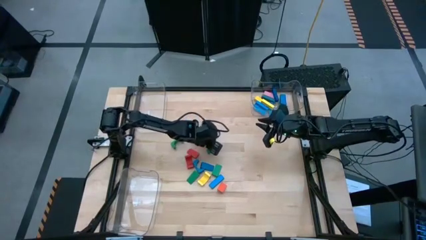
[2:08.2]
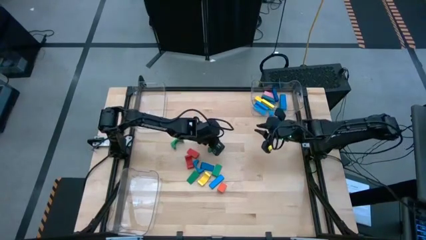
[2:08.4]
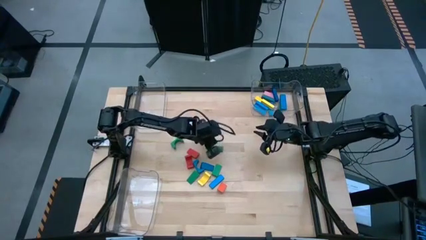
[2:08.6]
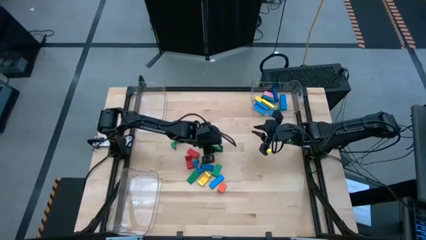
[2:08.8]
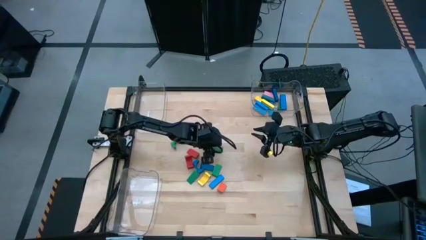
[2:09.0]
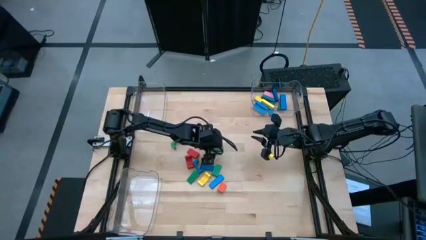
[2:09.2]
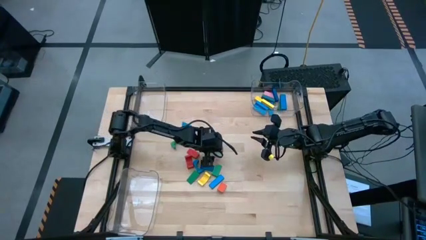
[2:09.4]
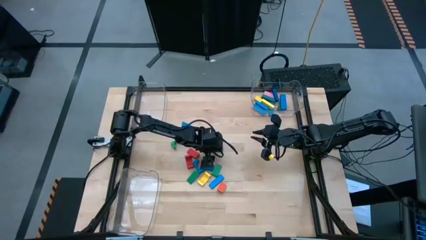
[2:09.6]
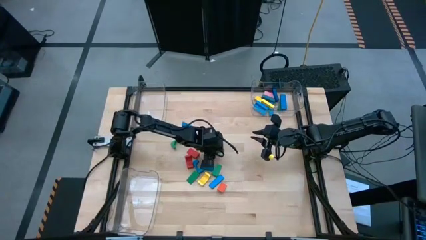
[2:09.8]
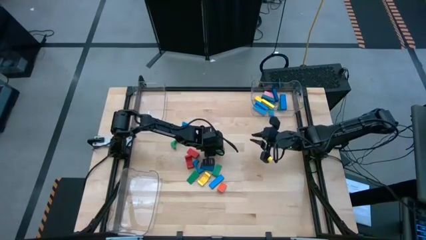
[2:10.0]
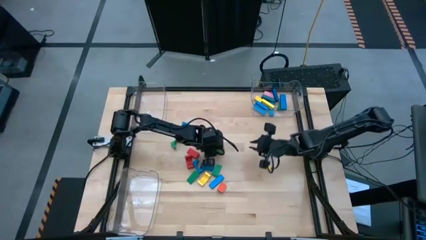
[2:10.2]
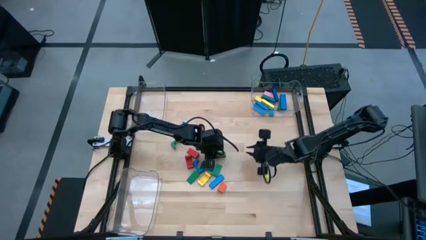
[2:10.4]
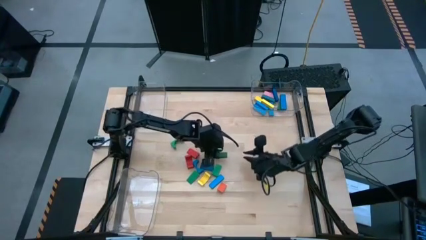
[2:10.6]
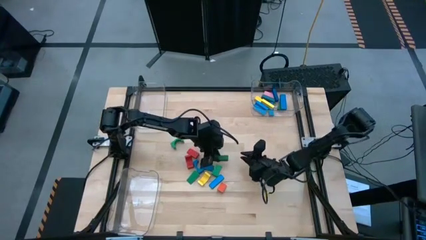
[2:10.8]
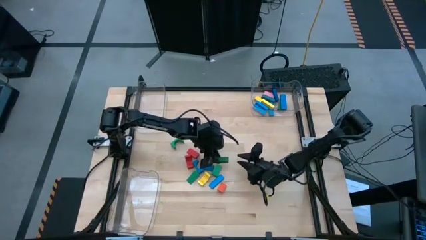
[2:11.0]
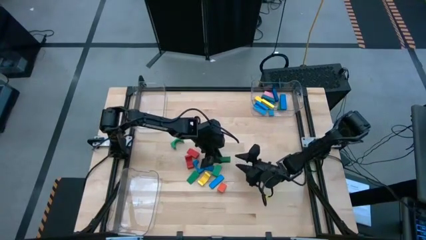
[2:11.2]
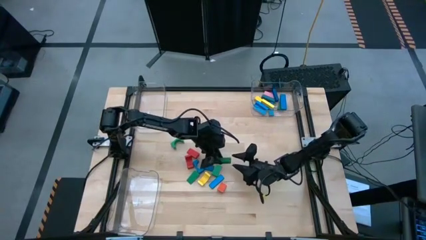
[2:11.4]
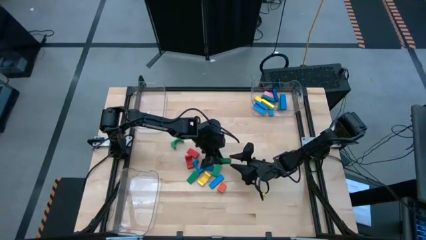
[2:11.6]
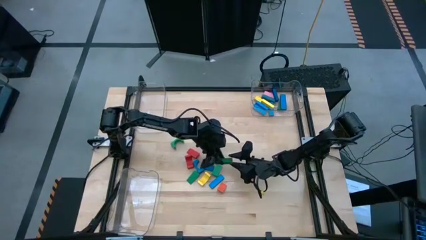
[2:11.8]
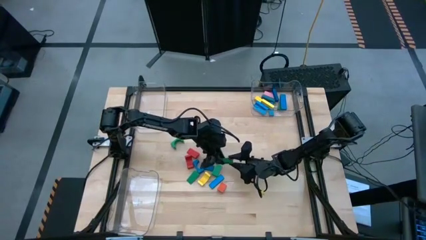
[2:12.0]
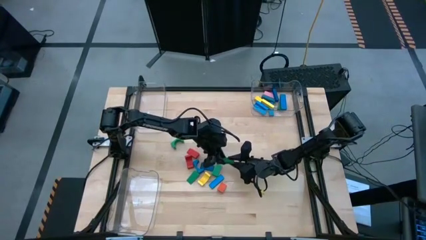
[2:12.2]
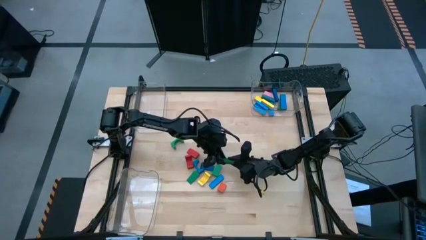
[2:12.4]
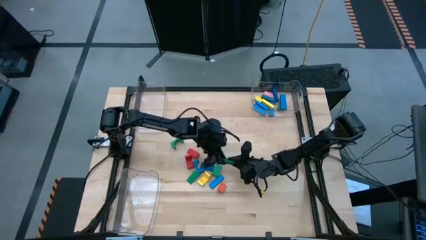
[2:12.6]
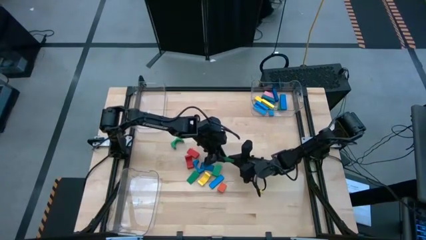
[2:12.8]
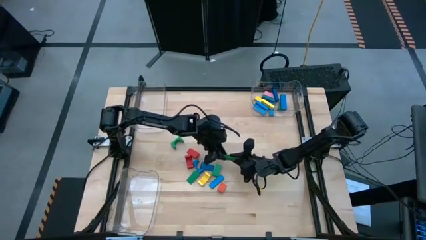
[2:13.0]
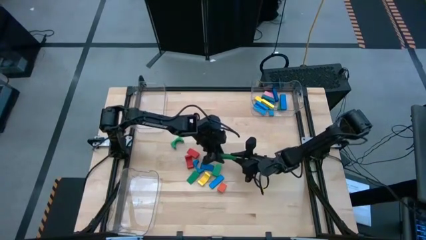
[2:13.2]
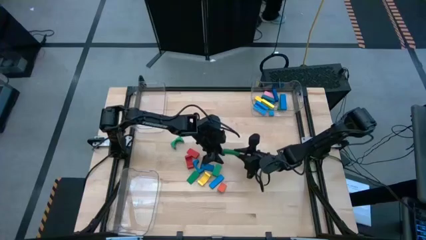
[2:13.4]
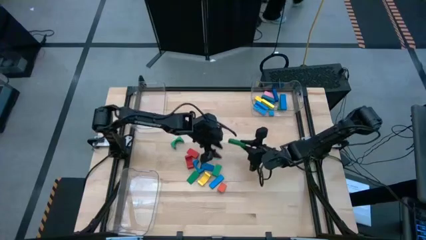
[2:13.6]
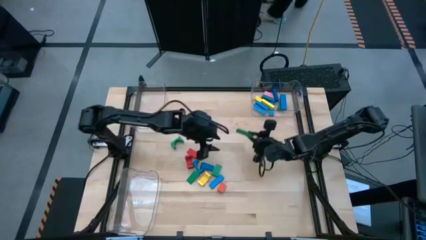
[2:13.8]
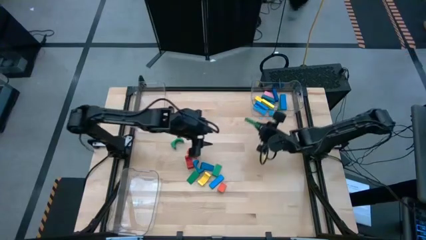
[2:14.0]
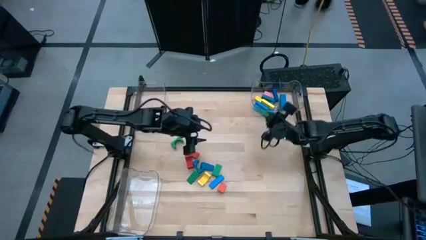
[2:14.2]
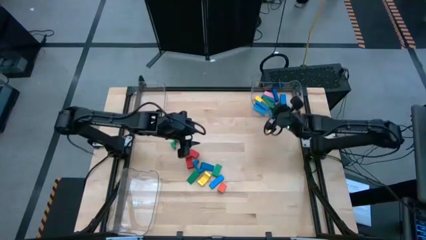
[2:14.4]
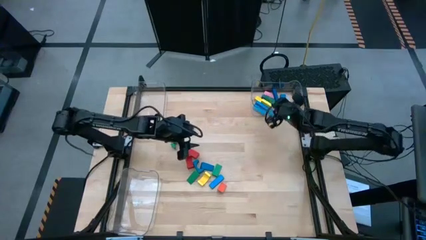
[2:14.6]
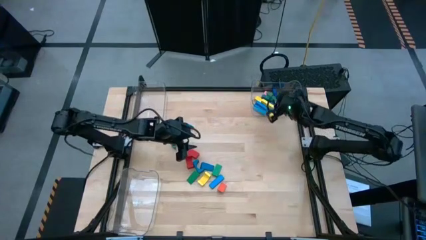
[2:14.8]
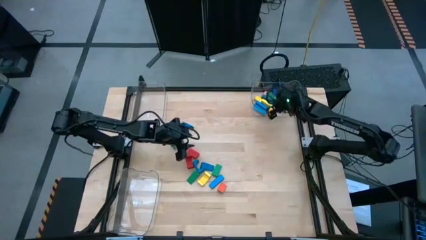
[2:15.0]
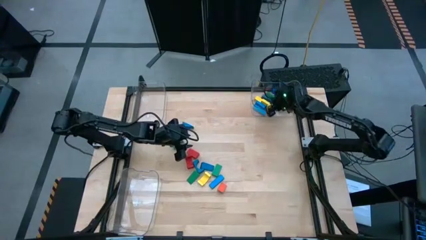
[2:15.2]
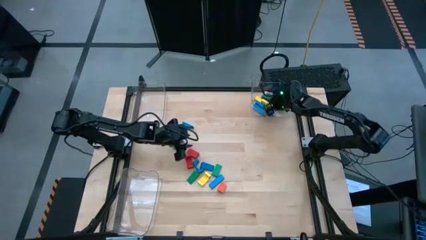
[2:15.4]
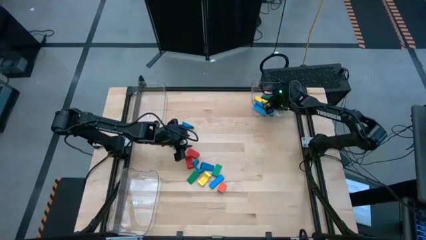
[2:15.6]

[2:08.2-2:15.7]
Task: Sort blocks by size
Put the green rectangular block into the top right transparent bin

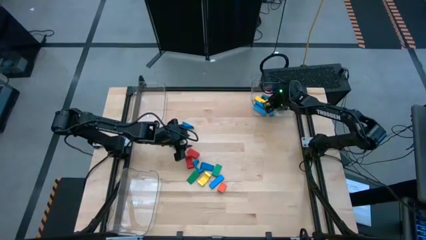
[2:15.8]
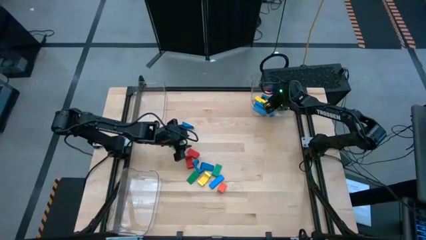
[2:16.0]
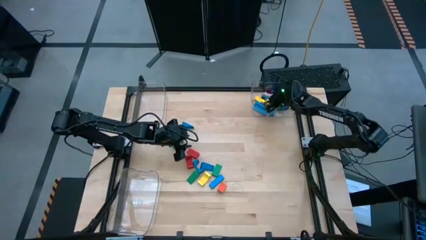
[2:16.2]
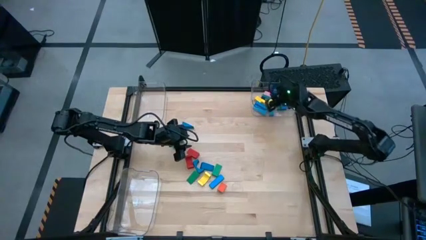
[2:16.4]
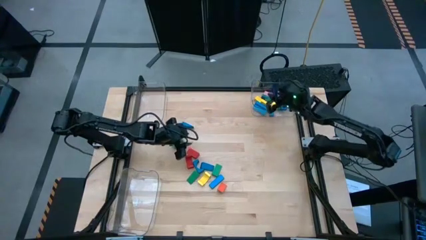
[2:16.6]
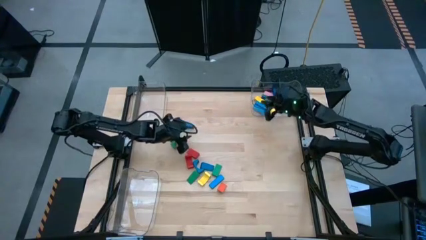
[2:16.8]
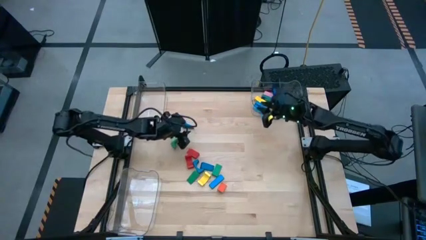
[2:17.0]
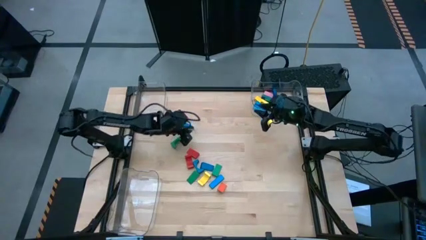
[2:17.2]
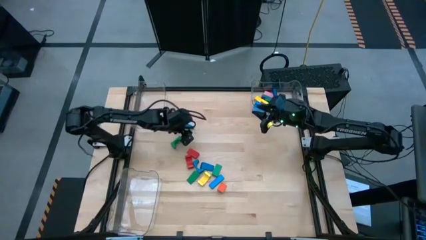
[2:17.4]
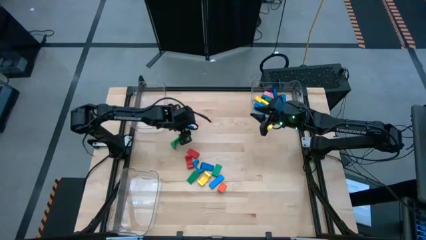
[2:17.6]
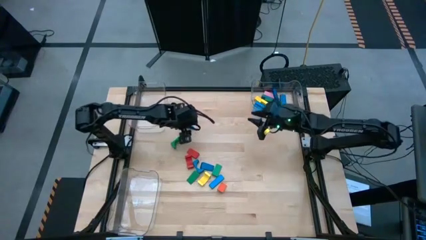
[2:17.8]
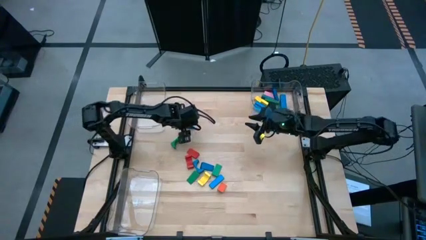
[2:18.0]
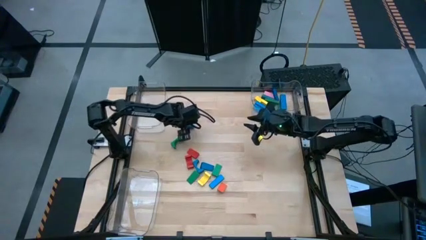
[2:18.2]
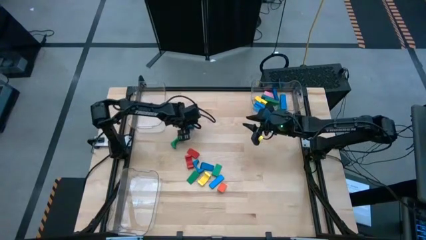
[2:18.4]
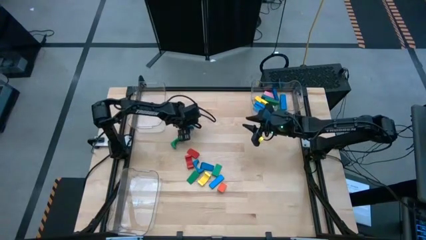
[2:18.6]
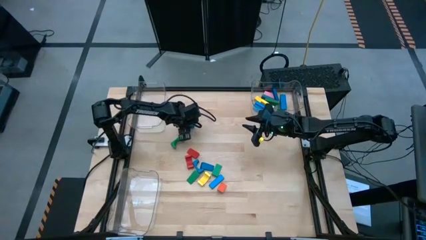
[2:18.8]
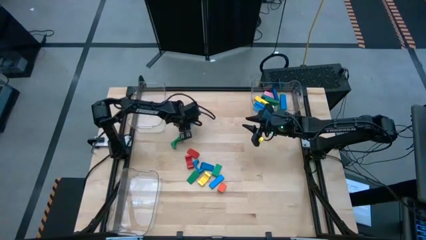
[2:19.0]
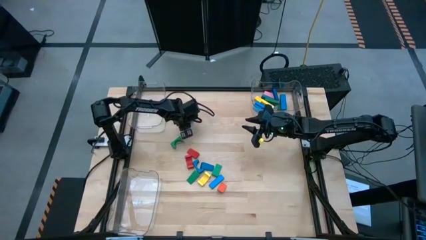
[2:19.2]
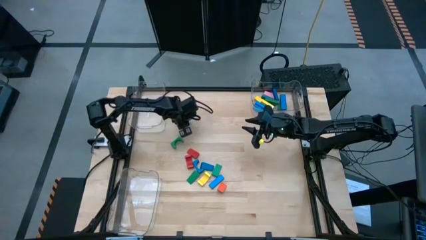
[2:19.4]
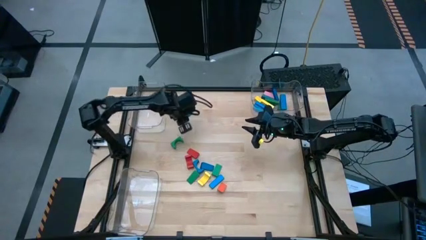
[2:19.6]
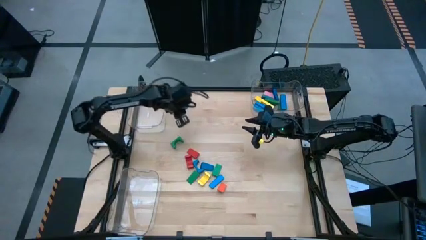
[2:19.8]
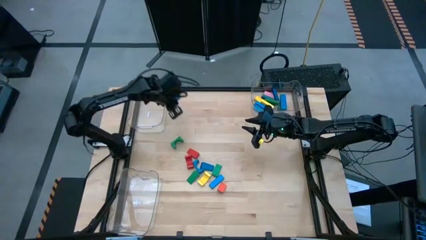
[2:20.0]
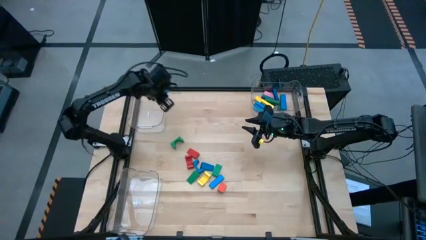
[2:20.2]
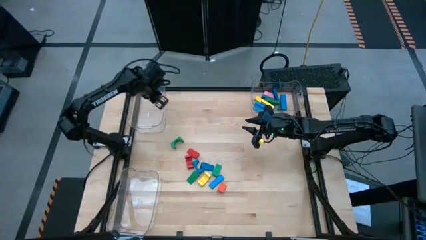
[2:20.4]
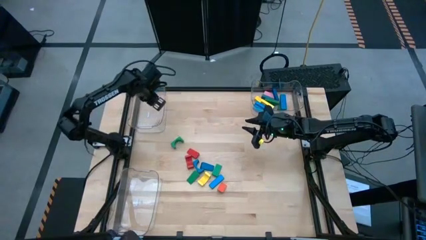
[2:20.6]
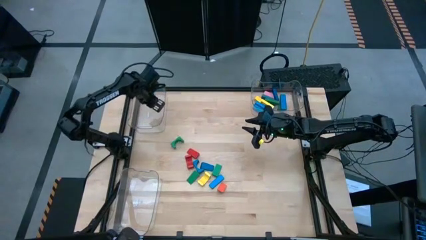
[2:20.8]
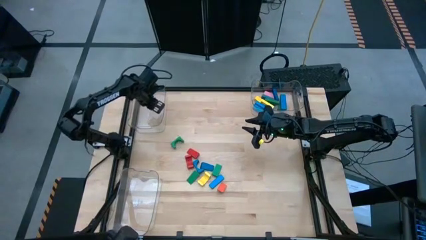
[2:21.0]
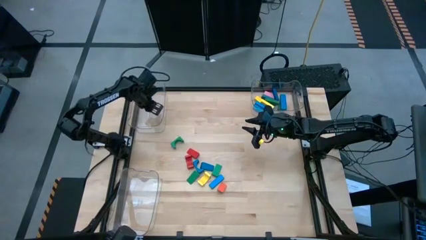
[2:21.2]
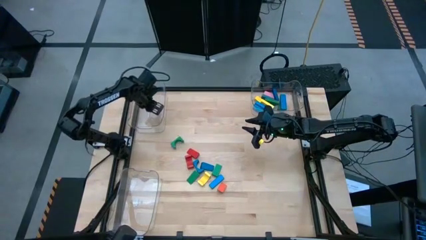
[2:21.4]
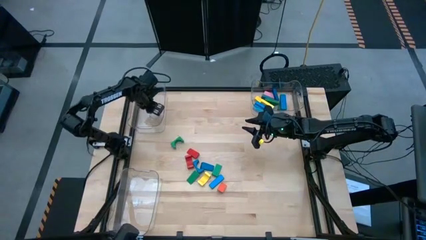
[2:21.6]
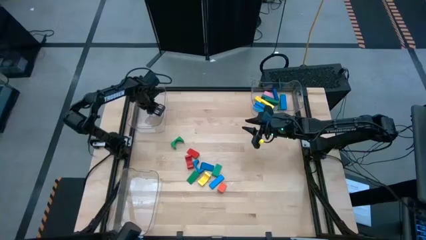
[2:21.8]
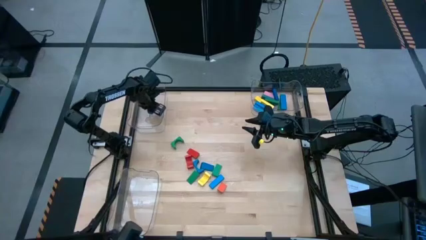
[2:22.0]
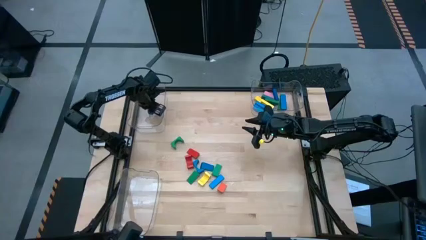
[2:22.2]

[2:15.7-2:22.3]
Put the blue triangle block into the top left transparent bin

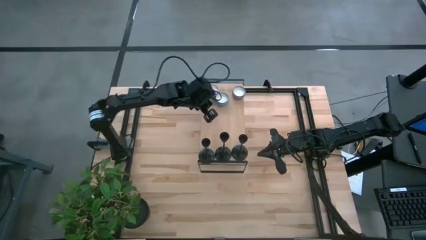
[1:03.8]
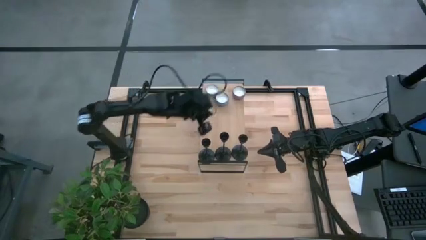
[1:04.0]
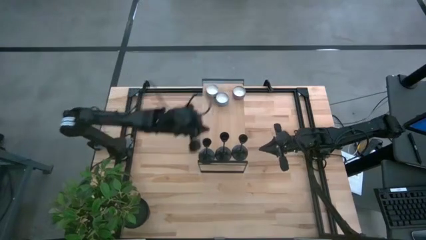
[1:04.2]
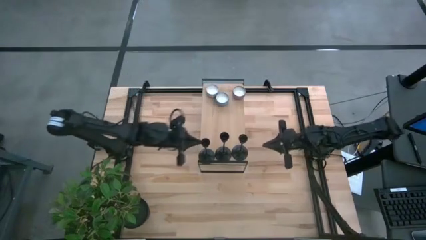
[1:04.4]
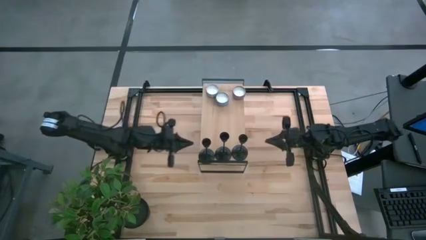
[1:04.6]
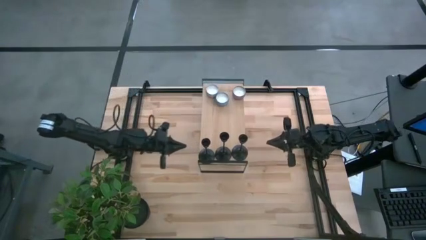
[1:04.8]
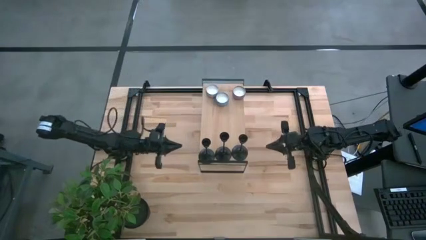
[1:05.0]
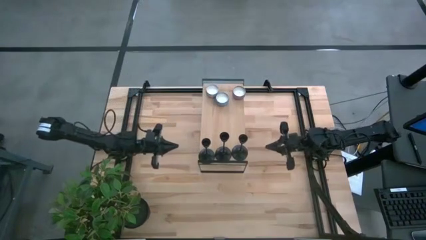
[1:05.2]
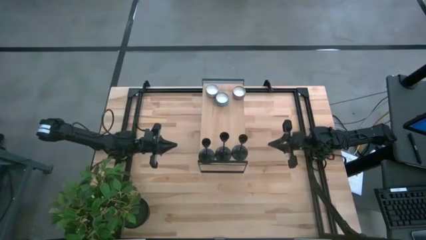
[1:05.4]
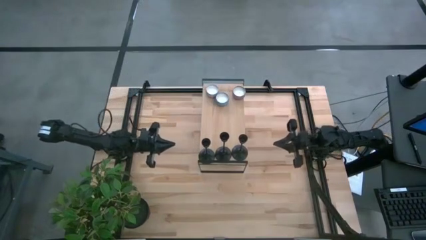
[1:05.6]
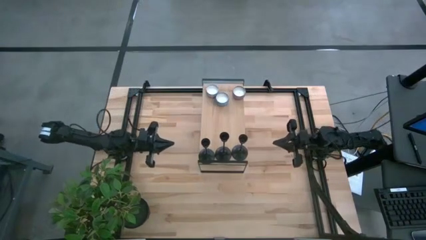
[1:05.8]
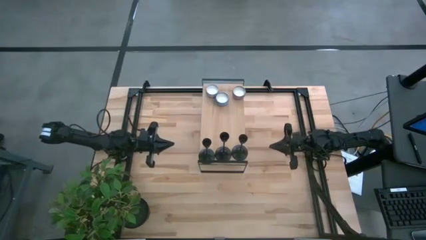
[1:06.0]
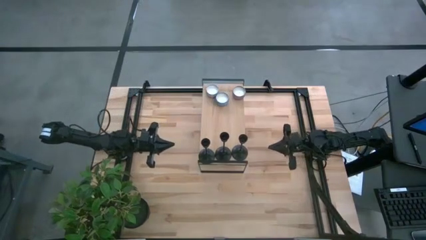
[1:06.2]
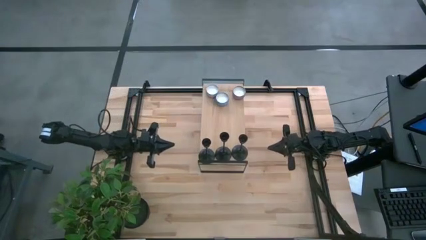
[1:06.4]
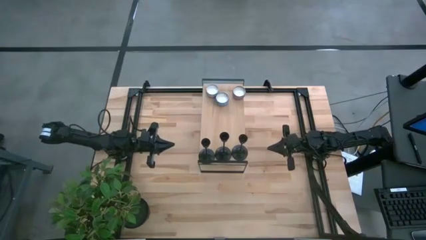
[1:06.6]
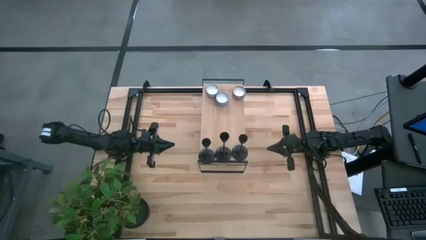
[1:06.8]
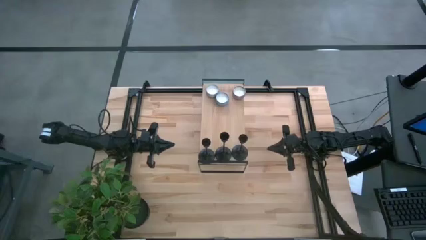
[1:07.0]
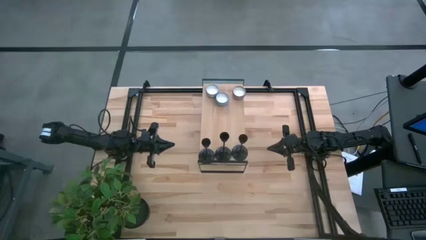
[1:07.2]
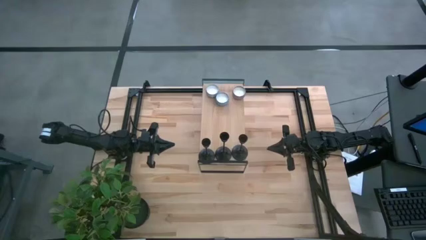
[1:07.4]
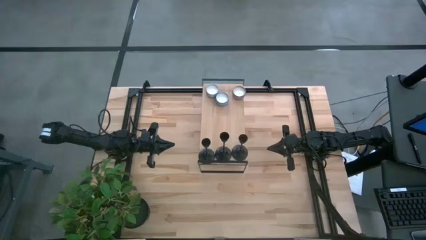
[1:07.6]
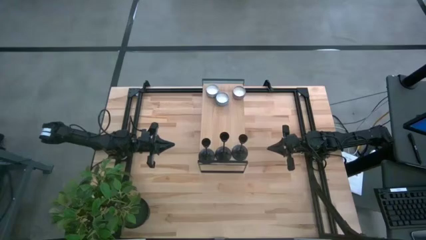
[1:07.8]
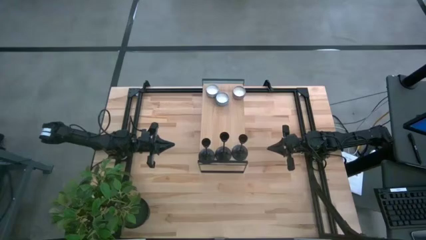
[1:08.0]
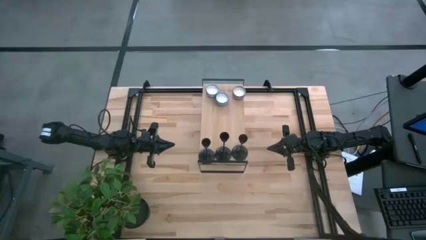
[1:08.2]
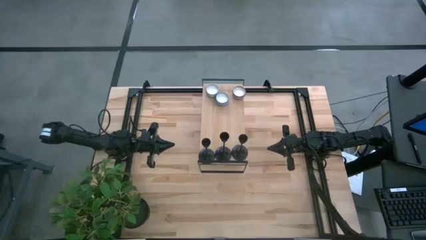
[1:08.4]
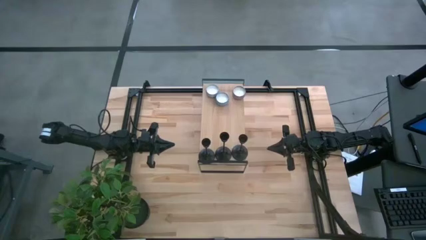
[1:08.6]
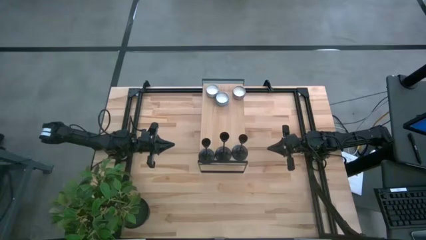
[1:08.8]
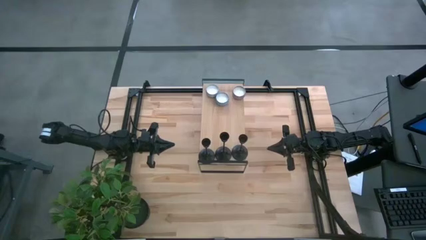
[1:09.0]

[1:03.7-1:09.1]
Task: Pick & Place candle stick holders
Return to Home Position
